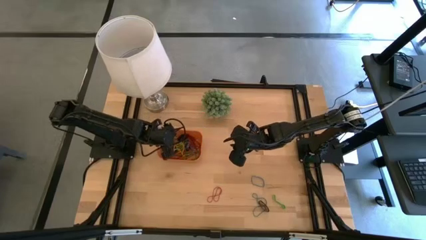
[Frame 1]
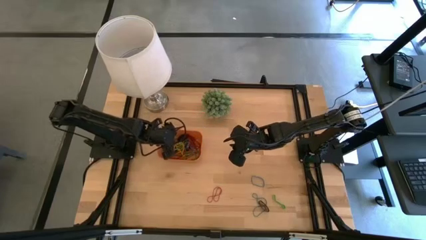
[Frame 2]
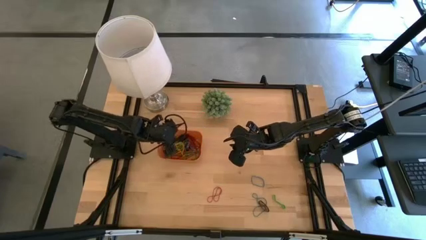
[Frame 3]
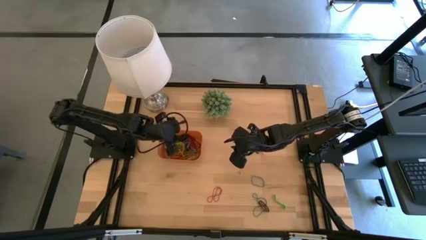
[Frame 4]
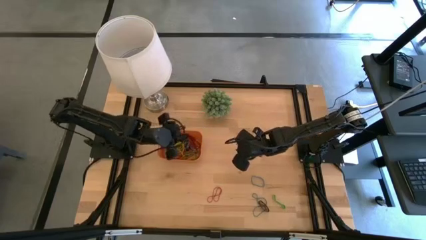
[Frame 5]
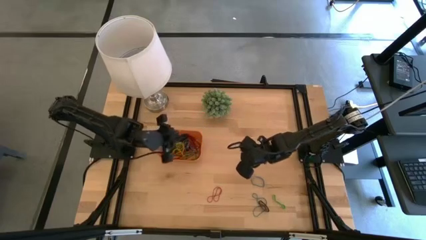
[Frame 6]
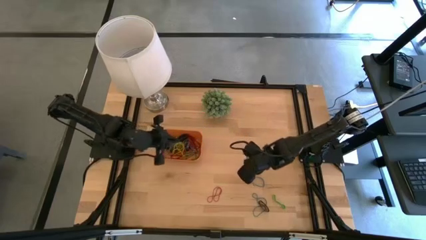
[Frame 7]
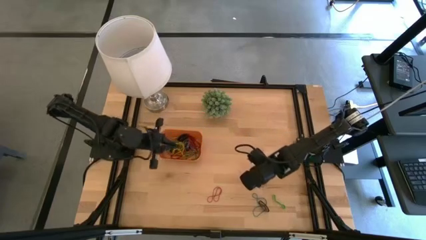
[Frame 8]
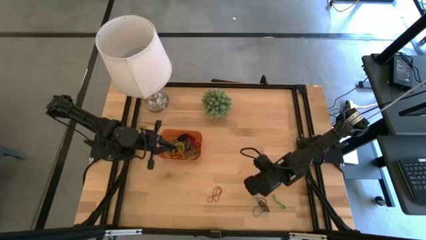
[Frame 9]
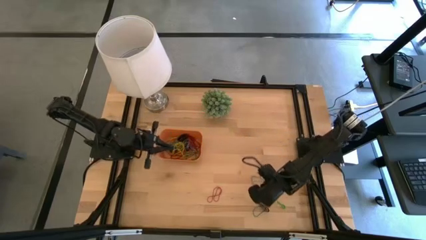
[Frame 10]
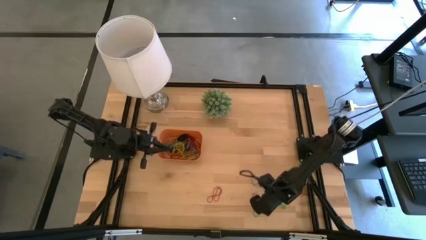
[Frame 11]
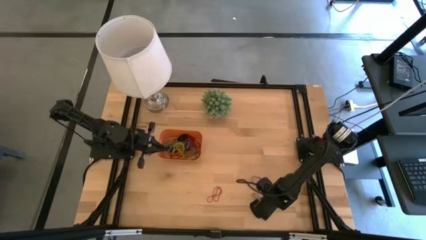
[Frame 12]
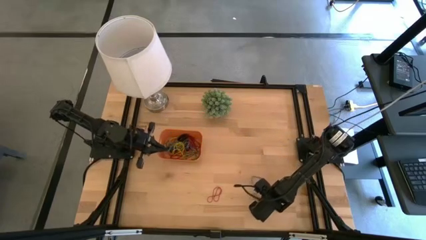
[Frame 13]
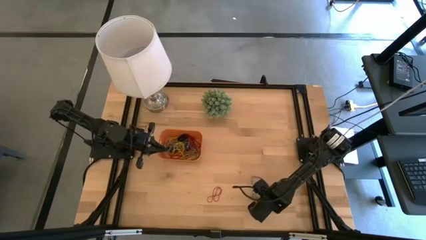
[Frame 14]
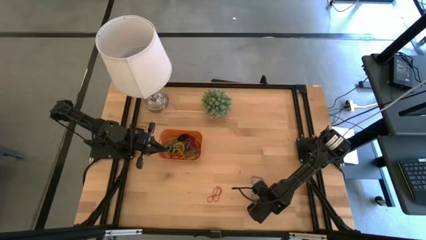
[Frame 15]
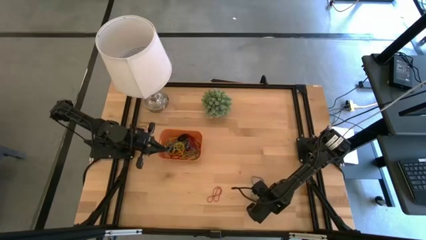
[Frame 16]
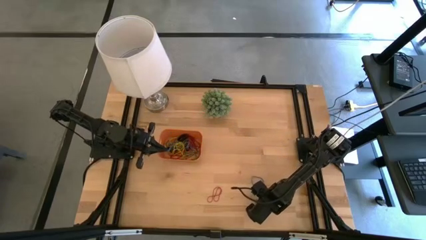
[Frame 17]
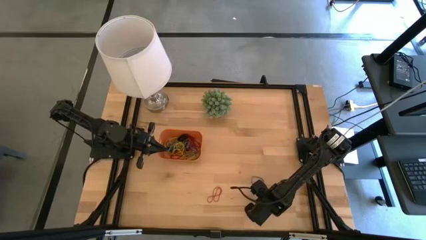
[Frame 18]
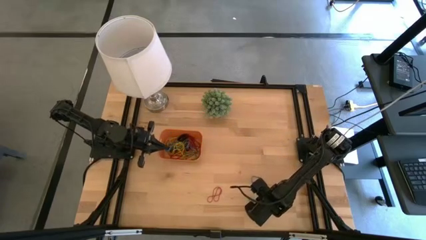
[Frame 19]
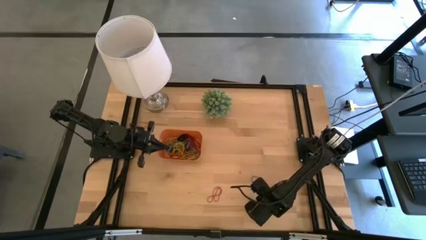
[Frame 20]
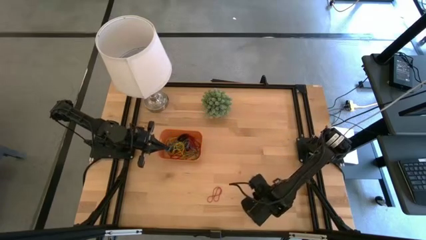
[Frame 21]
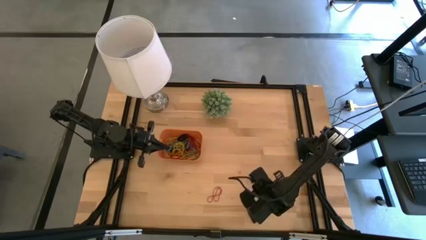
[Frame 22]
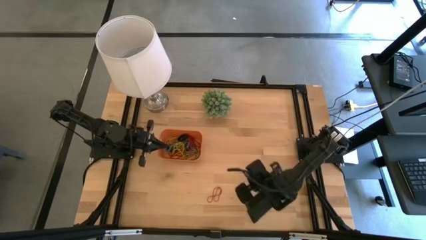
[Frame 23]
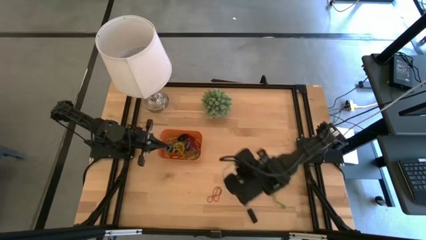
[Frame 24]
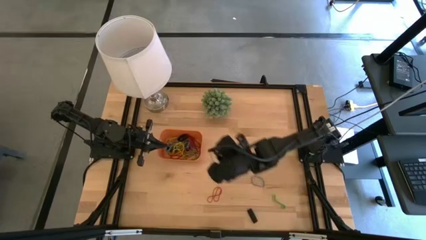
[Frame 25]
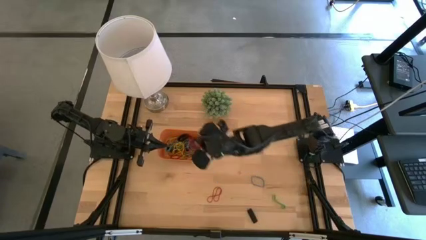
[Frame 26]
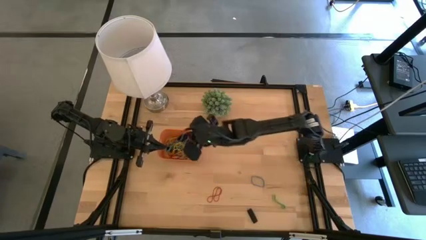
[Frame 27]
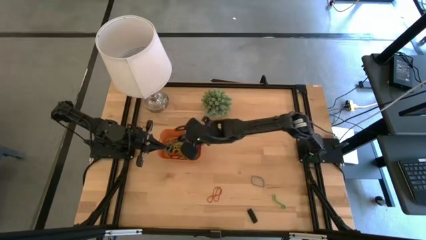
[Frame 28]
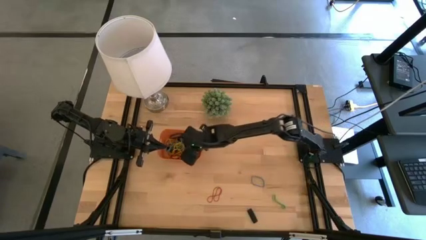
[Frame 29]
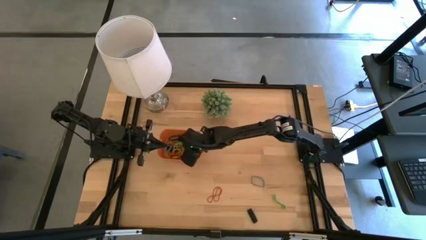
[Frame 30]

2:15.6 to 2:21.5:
Task: Pick and place rubber bands into bin
Put the blue rubber band into the orange bin

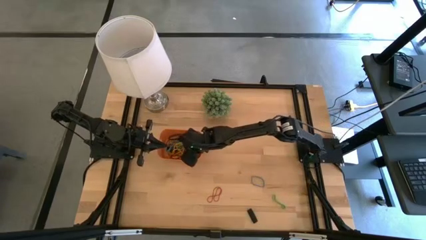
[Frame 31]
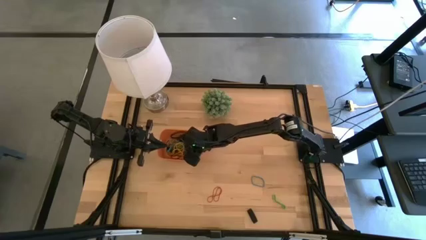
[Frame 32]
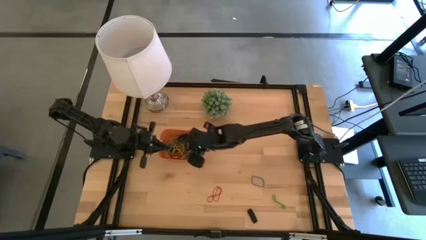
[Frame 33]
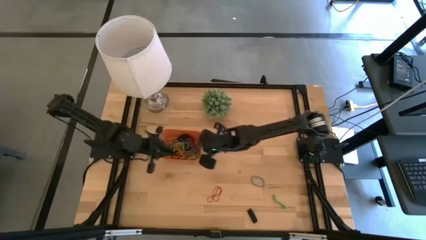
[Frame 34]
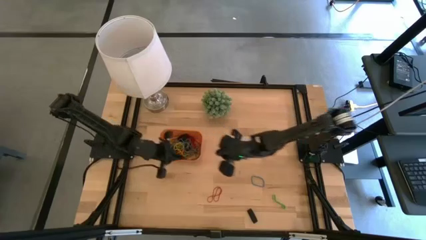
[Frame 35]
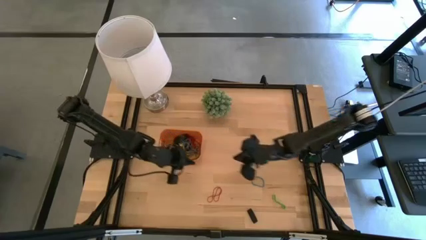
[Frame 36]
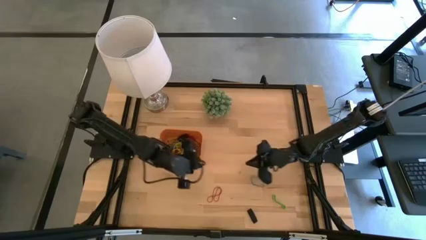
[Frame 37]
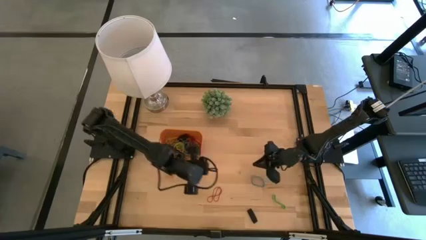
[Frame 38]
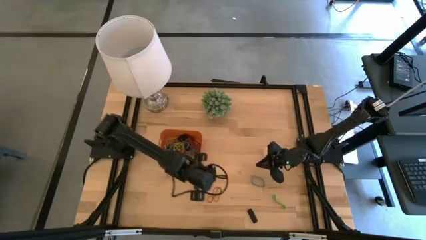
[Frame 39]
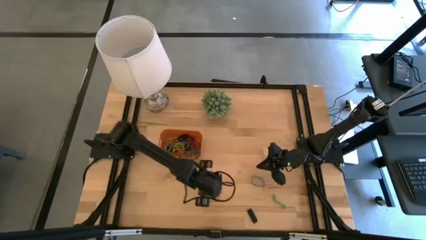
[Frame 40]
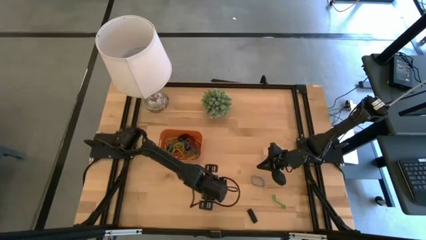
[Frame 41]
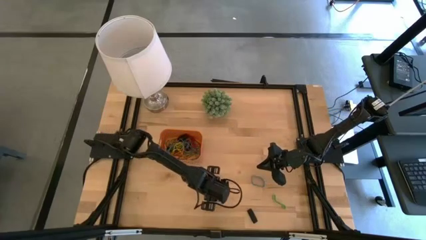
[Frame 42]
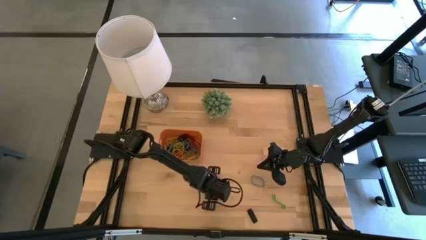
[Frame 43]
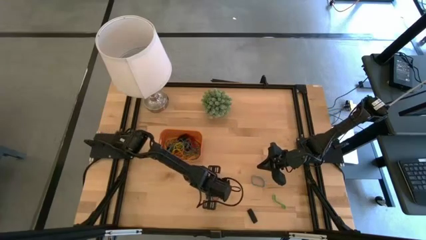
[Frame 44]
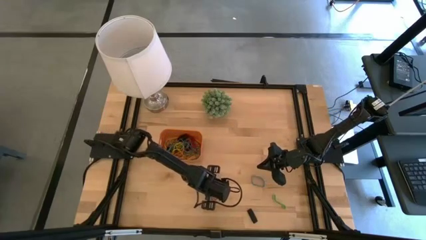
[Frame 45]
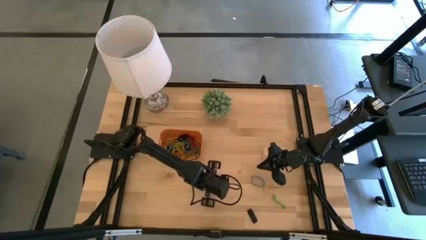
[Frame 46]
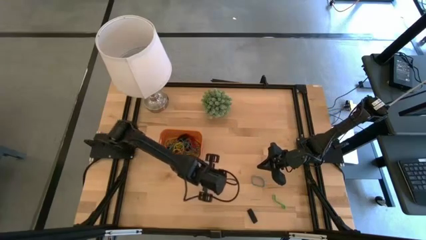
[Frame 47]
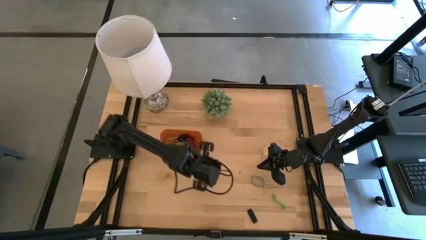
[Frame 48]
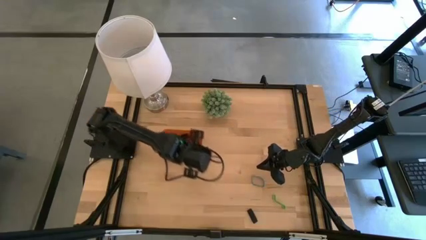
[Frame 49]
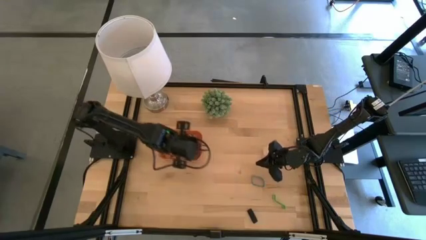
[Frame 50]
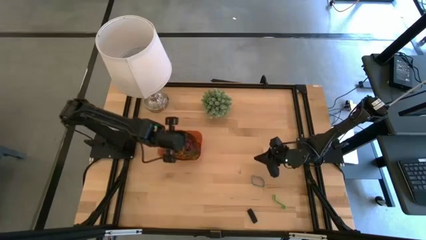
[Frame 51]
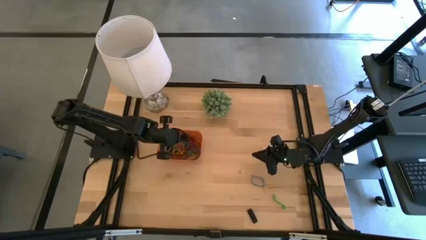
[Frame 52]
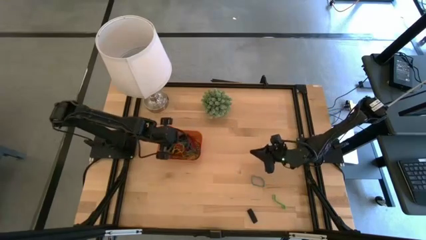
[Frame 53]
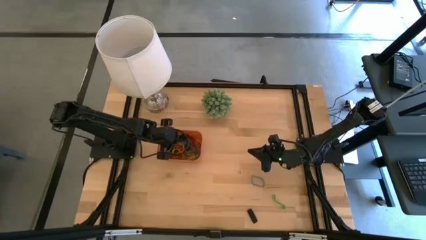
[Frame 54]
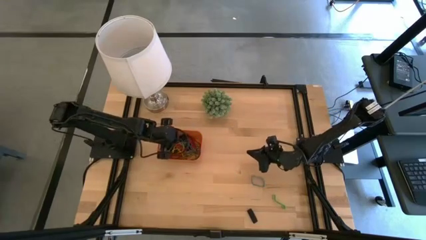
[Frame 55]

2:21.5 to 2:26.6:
Put the red rubber band into the orange bin

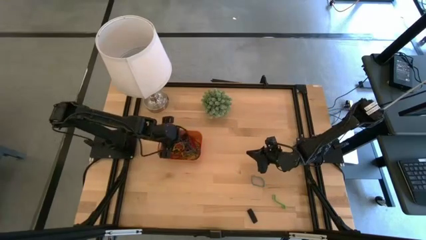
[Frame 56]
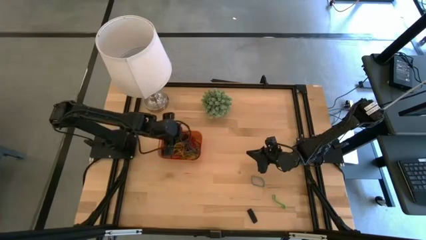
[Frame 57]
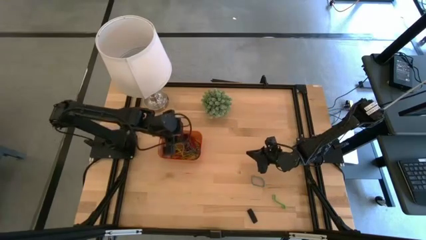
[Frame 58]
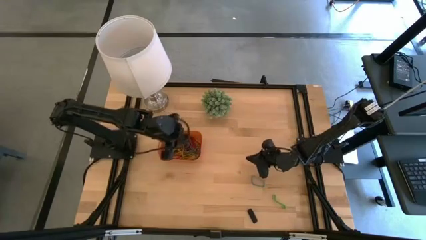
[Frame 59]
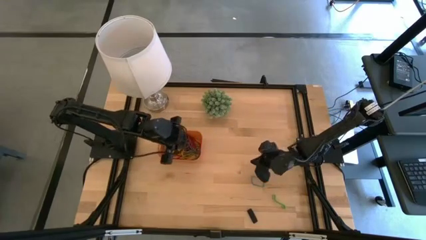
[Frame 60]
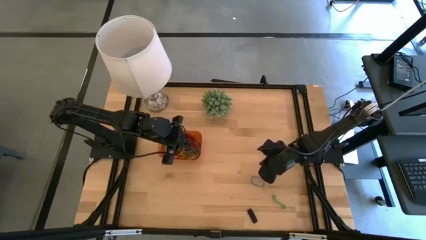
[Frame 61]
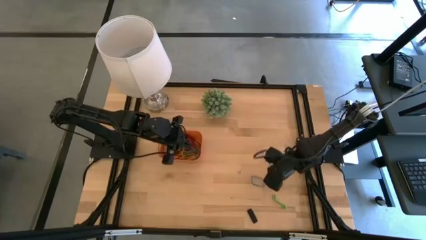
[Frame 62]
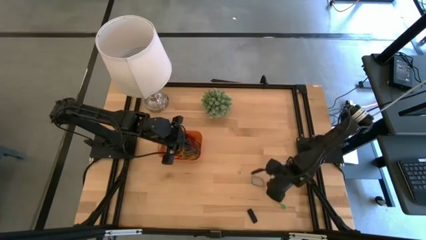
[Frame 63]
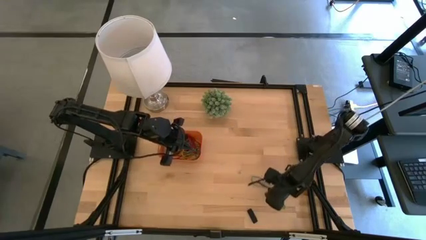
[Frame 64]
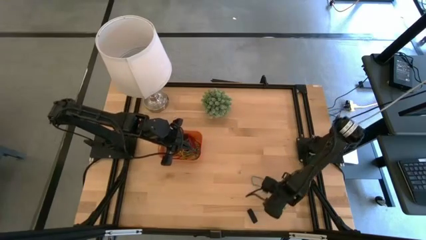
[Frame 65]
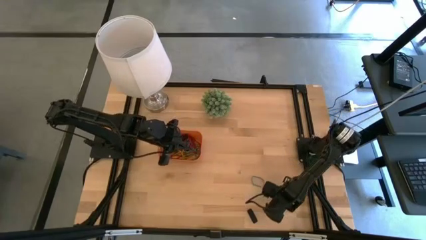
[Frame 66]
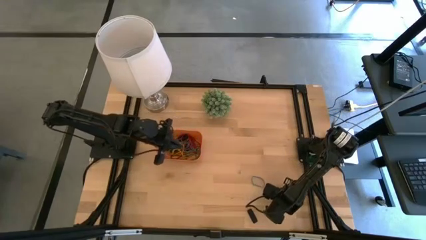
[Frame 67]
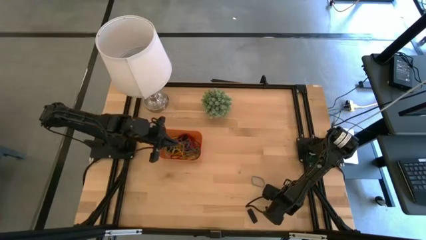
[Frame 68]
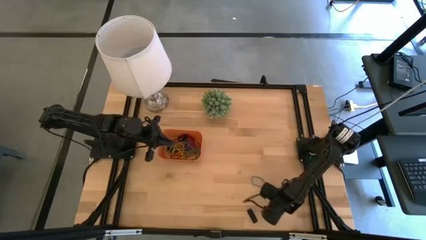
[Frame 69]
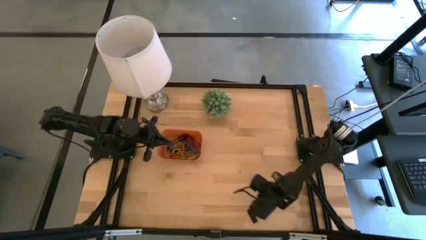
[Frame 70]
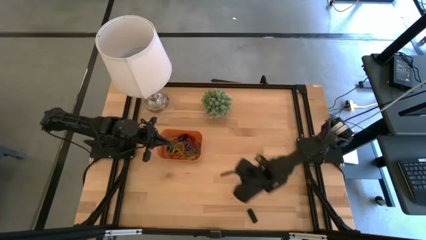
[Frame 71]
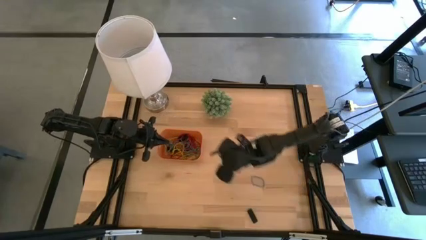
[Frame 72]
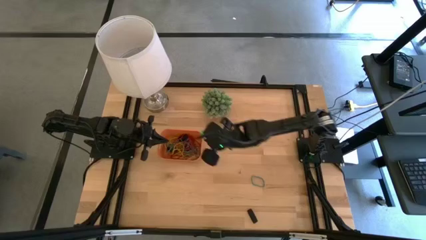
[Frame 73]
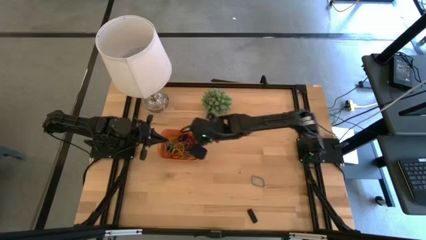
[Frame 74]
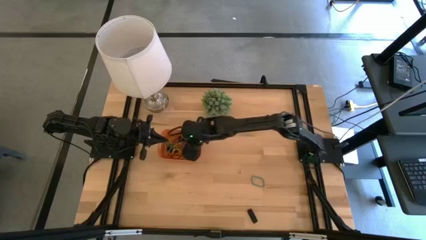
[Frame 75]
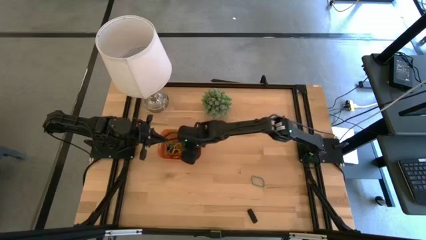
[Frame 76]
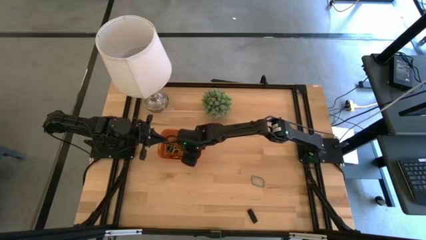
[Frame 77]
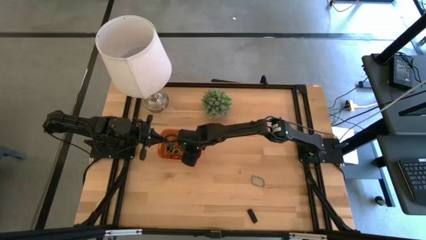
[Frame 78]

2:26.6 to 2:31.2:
Put the green rubber band into the orange bin
